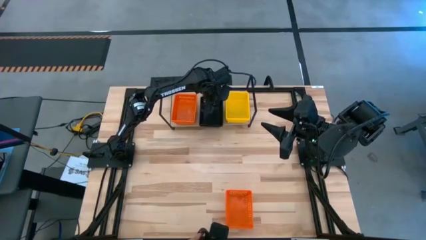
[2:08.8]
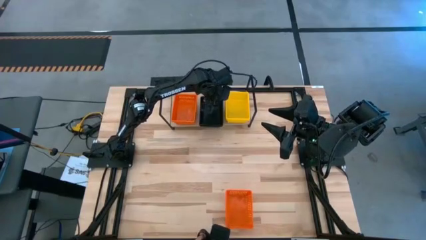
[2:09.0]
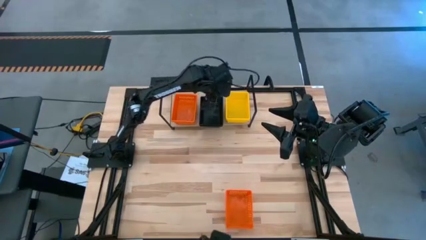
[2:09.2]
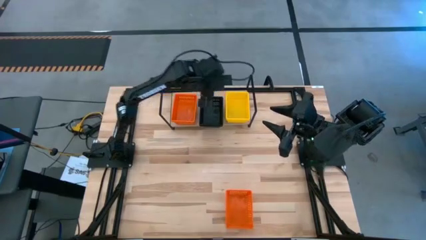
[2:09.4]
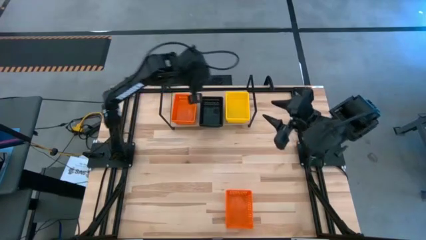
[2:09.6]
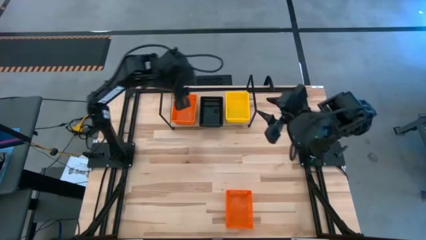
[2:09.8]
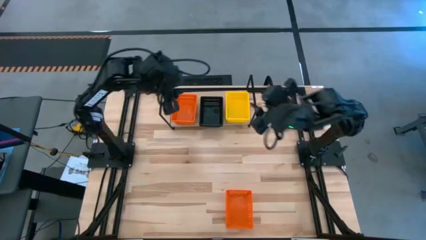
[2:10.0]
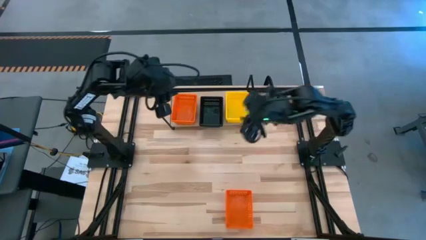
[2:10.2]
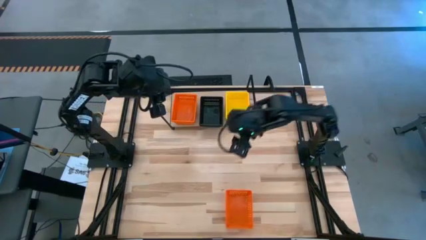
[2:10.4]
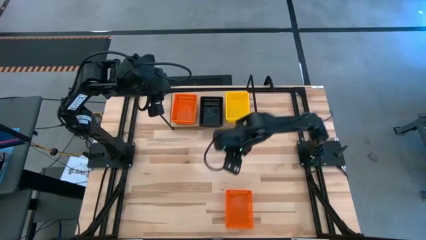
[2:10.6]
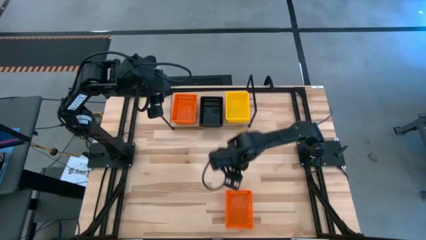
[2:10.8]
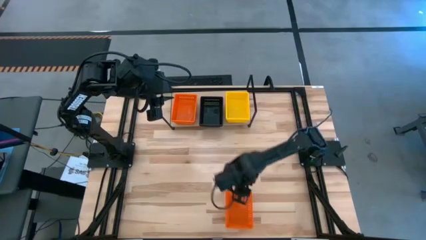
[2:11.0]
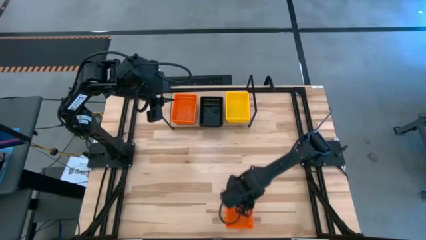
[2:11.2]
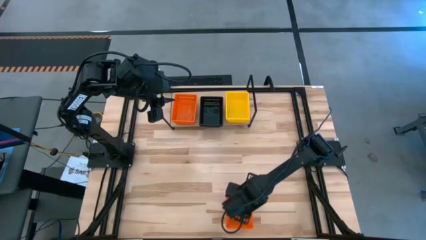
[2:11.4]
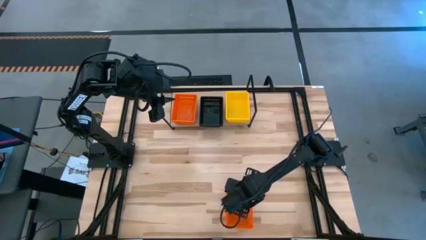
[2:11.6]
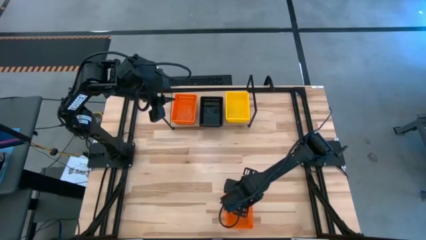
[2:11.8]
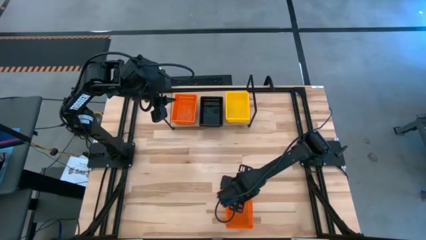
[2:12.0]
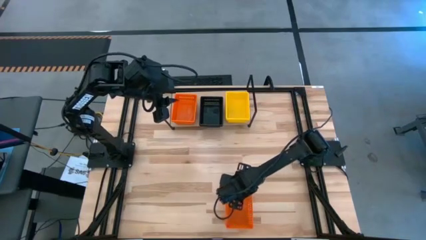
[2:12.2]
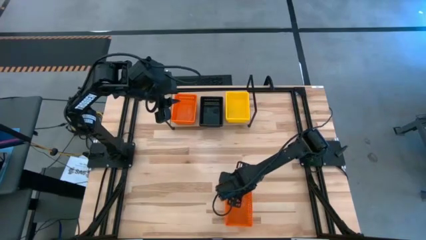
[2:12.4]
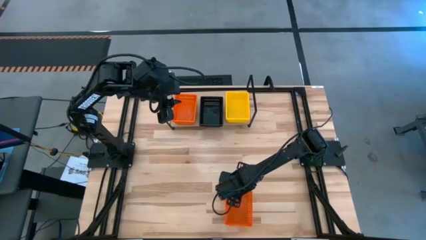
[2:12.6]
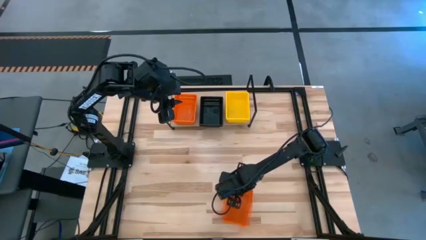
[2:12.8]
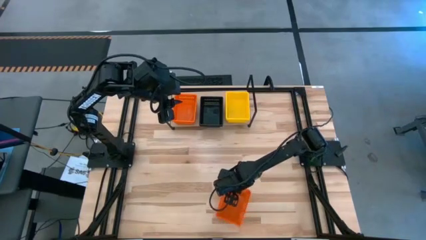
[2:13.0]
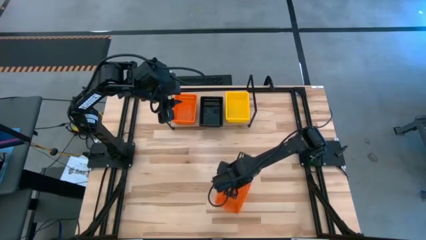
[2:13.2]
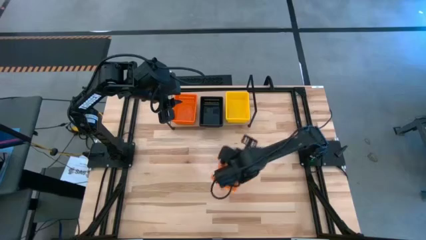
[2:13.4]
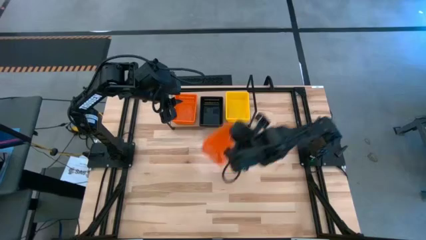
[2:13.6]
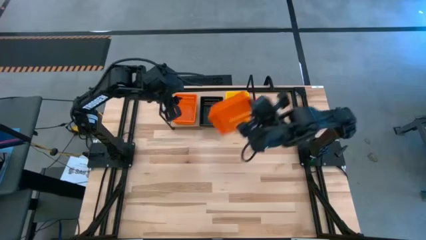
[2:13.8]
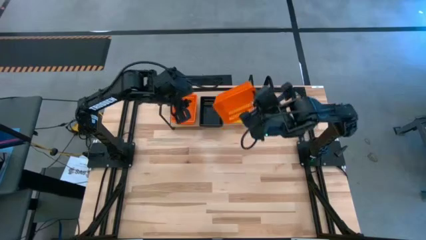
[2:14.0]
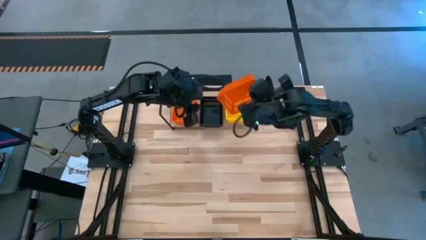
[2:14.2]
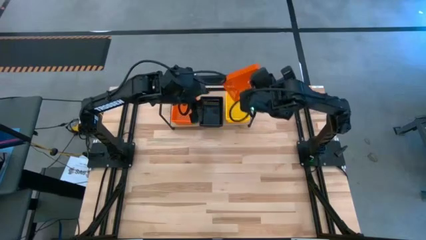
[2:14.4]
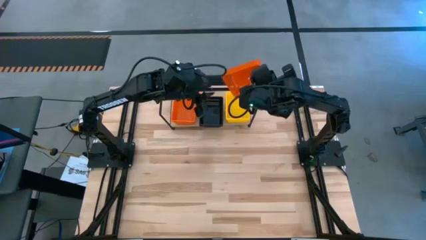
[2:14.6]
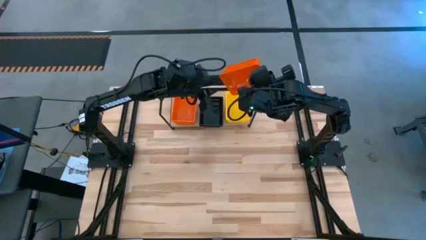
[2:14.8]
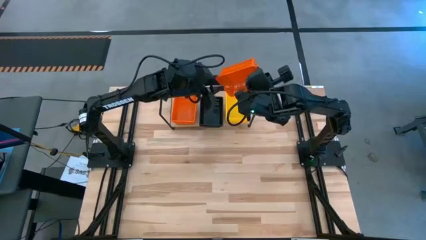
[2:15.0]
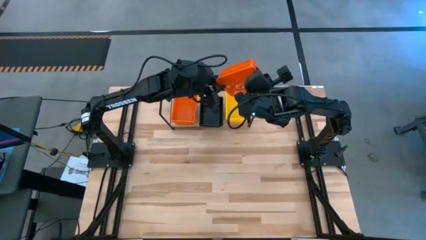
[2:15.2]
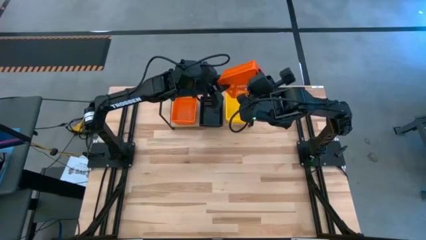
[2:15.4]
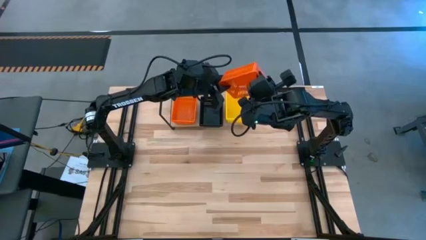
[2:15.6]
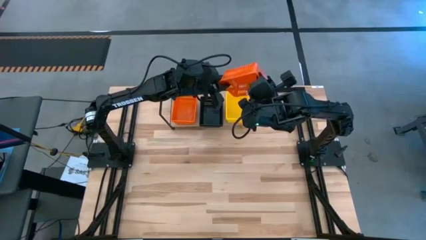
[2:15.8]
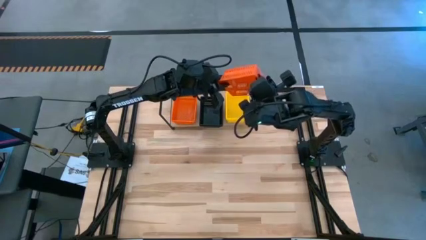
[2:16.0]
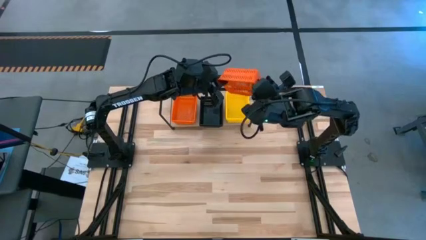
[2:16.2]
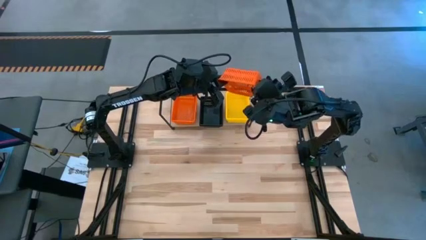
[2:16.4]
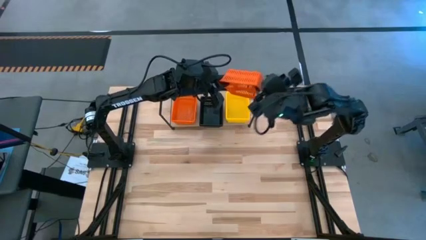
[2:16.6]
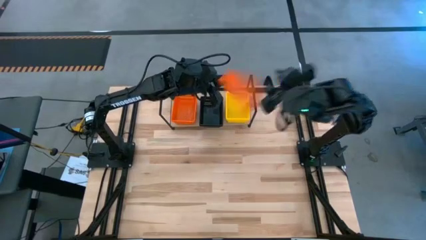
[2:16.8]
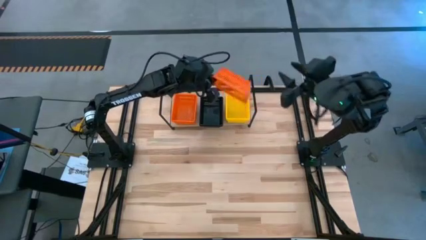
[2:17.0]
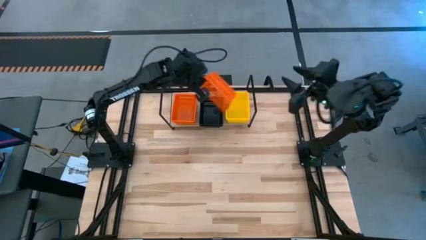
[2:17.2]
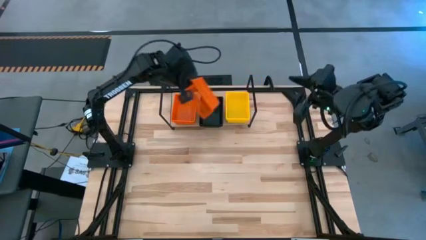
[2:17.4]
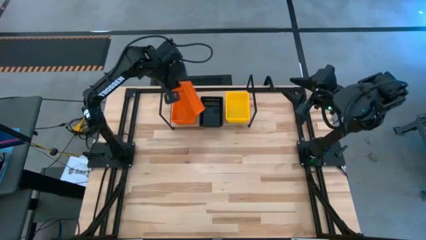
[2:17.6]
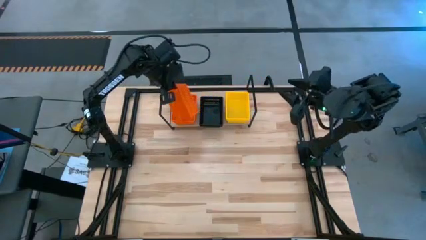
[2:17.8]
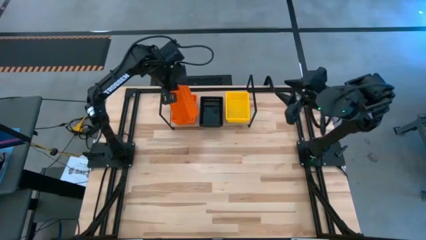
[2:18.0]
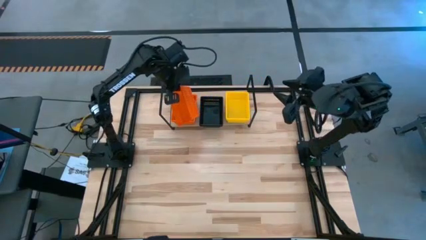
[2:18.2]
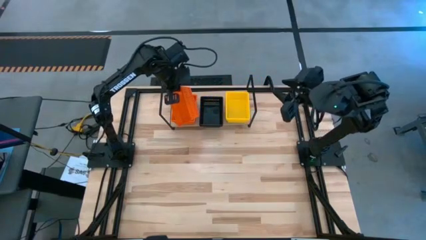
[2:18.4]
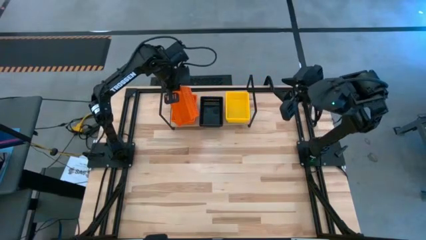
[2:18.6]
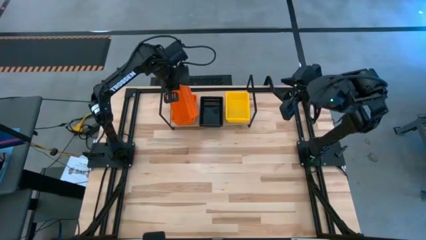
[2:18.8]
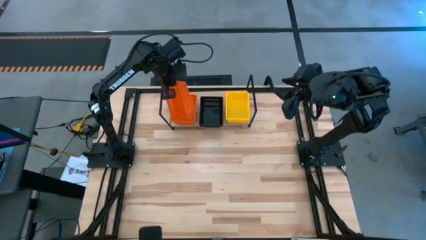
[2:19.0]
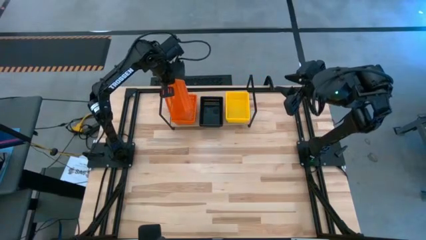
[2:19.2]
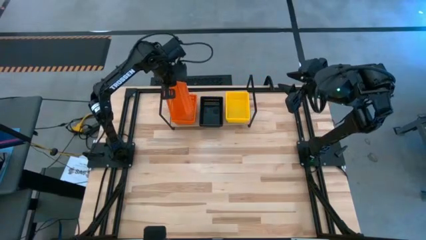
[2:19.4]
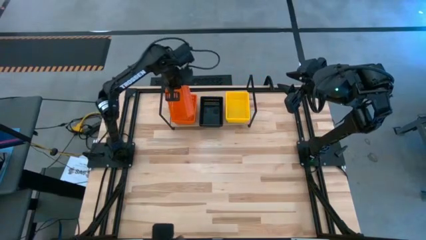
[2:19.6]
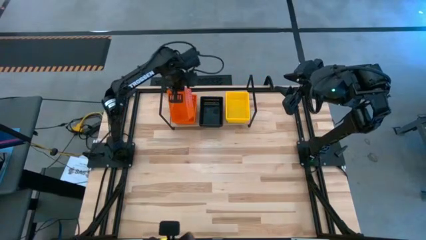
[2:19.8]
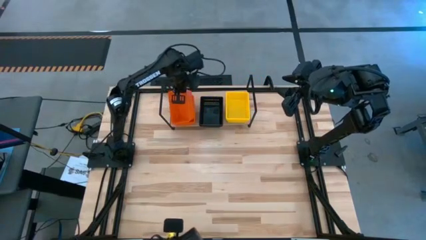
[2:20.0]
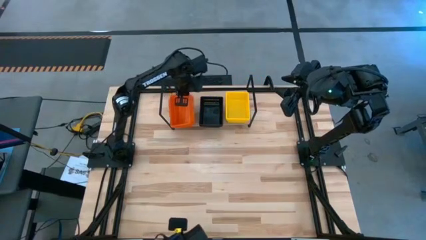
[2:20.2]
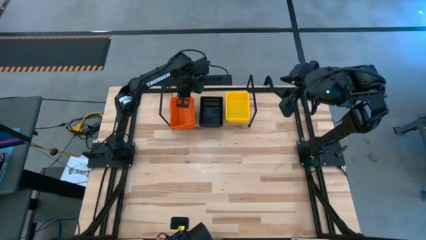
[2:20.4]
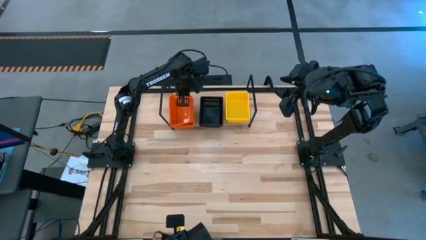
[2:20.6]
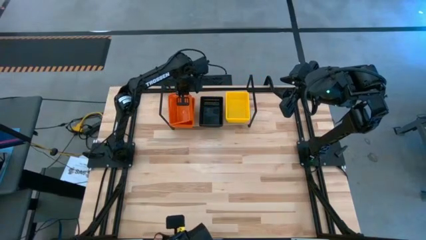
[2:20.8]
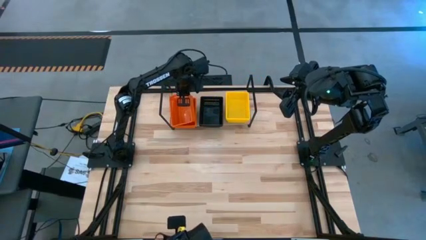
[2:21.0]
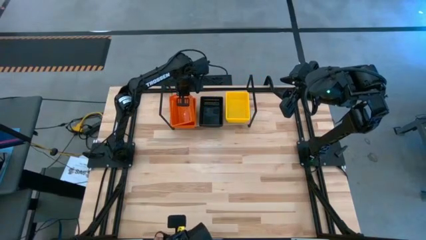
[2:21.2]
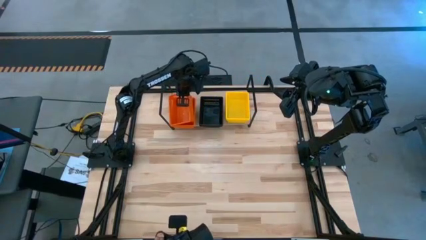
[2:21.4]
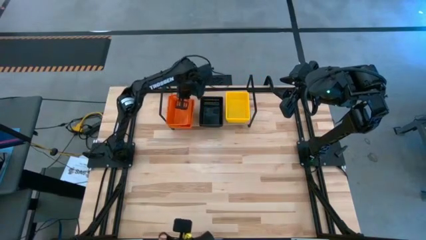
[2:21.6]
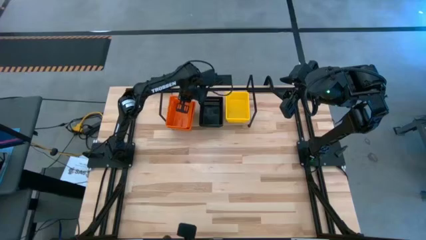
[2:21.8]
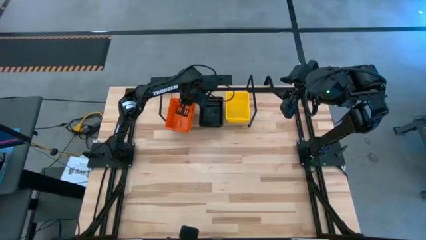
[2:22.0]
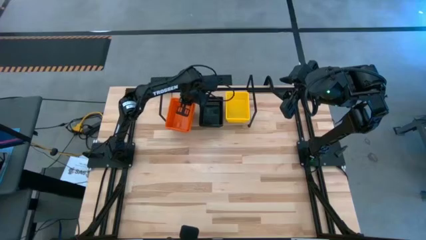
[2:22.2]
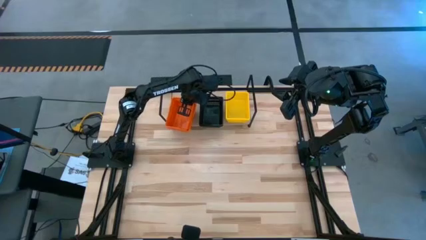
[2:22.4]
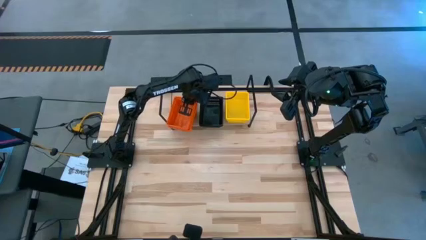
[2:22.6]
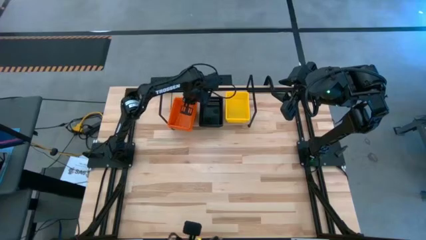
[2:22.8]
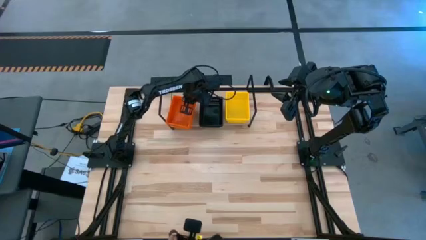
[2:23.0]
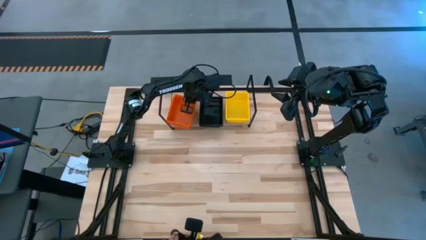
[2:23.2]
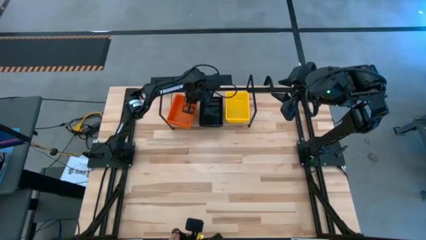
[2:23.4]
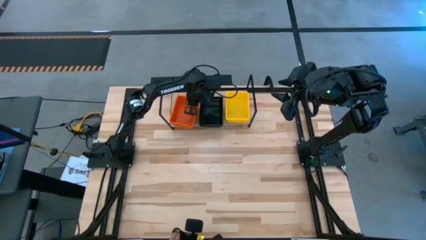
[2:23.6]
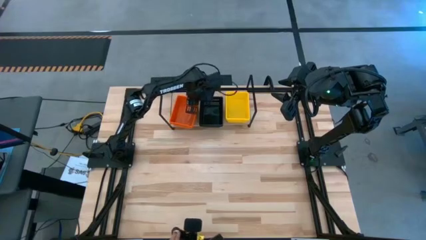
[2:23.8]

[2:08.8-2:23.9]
Task: Stack baskets on shelf by color
Stack the orange basket on the orange basket on the shelf
